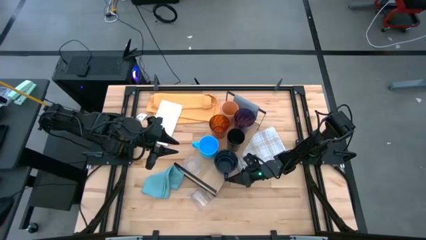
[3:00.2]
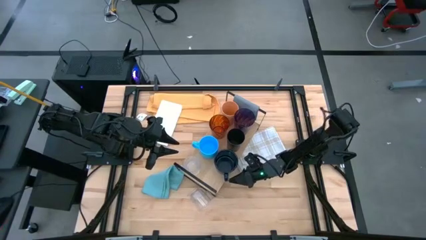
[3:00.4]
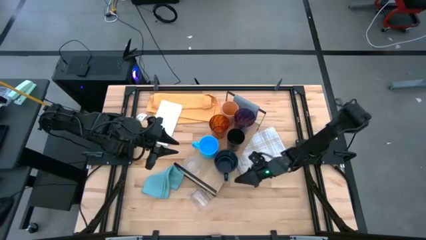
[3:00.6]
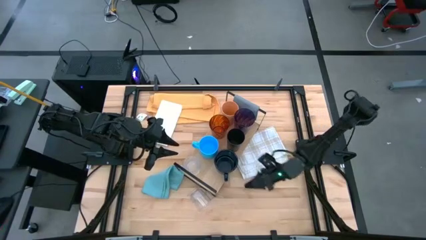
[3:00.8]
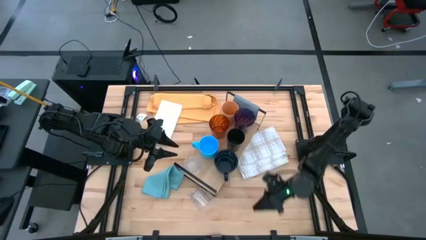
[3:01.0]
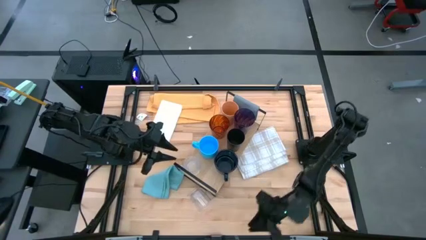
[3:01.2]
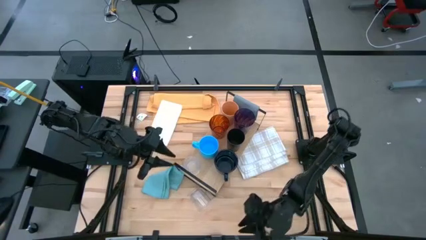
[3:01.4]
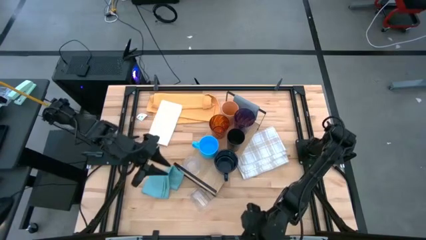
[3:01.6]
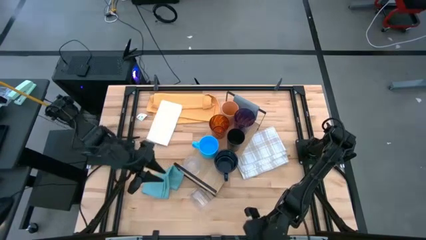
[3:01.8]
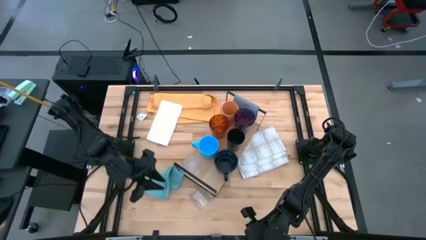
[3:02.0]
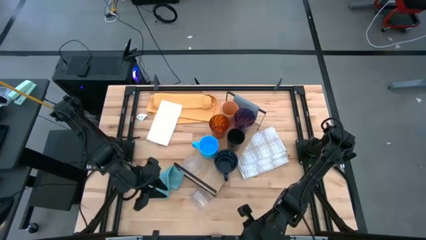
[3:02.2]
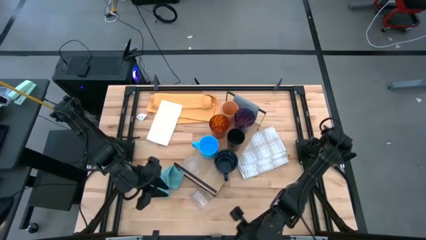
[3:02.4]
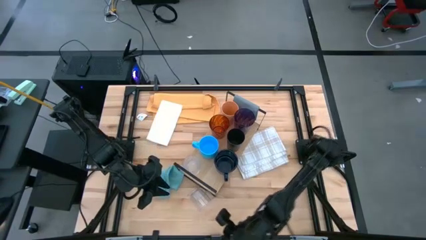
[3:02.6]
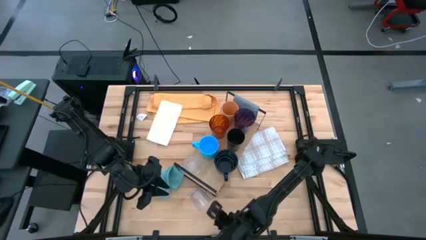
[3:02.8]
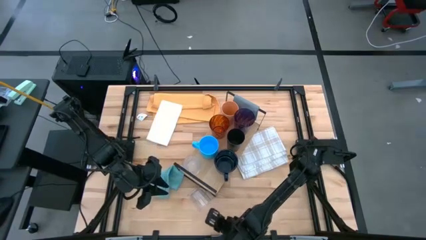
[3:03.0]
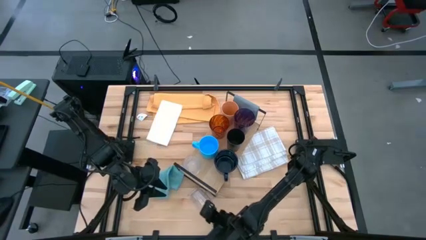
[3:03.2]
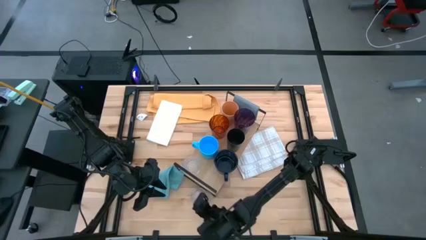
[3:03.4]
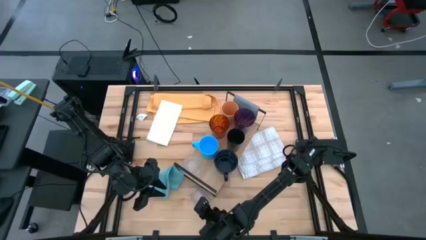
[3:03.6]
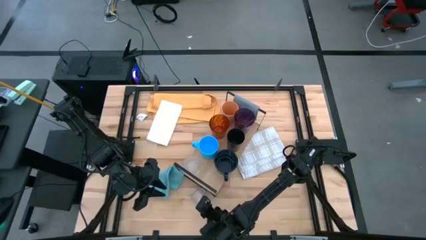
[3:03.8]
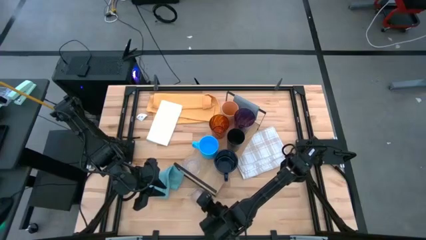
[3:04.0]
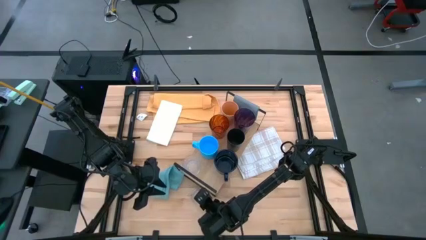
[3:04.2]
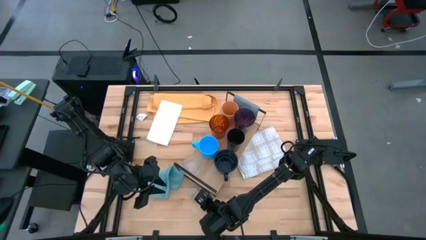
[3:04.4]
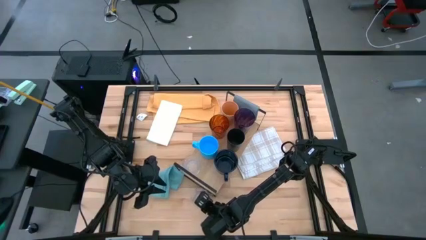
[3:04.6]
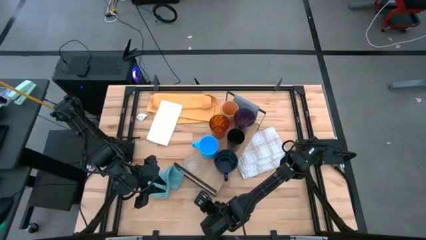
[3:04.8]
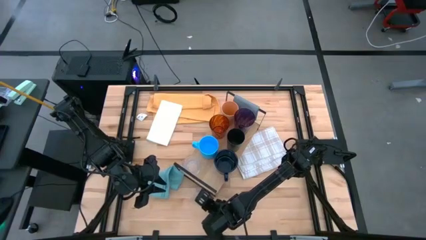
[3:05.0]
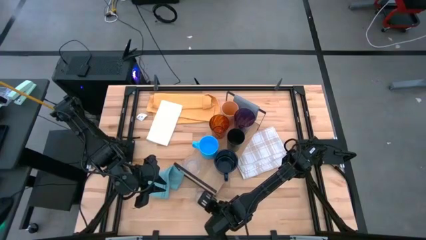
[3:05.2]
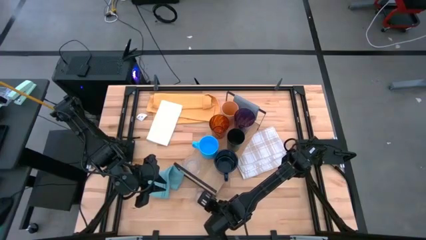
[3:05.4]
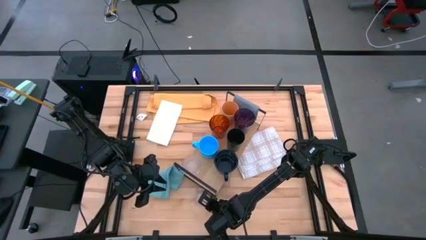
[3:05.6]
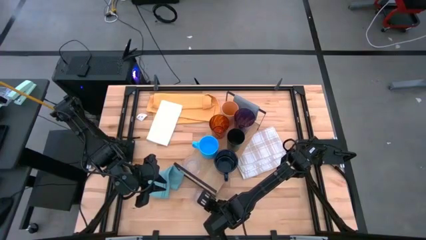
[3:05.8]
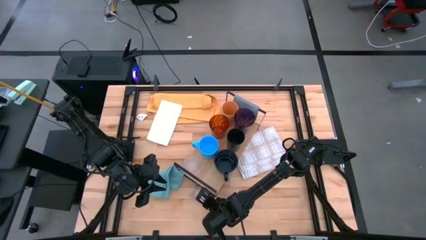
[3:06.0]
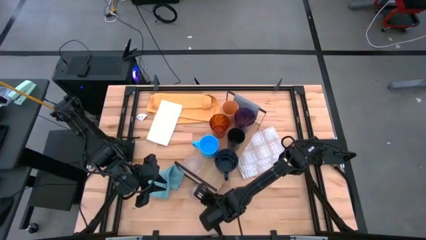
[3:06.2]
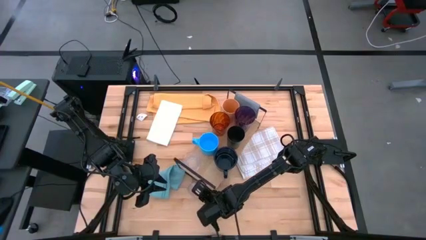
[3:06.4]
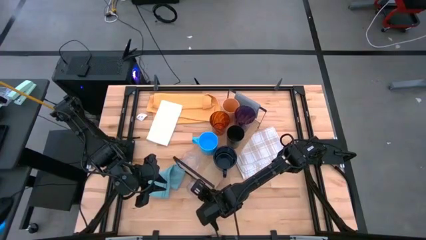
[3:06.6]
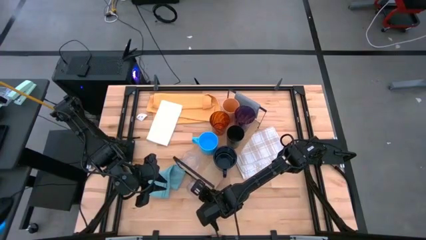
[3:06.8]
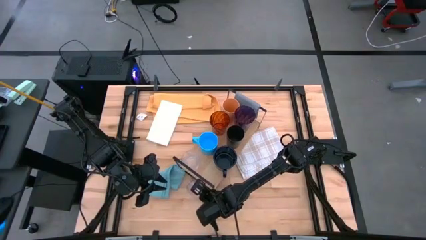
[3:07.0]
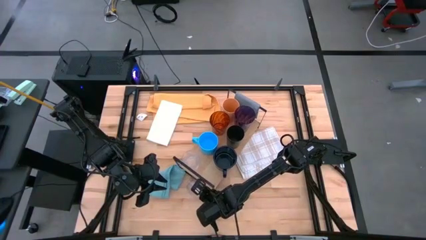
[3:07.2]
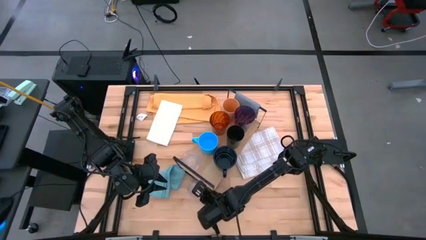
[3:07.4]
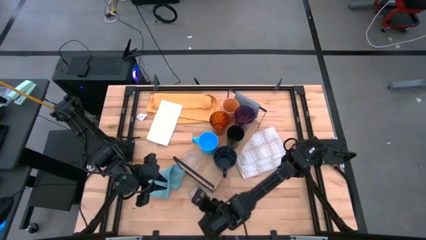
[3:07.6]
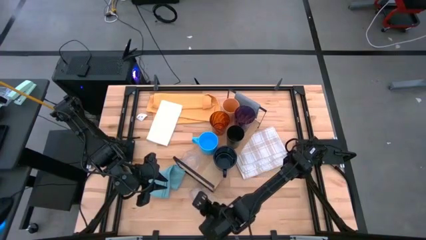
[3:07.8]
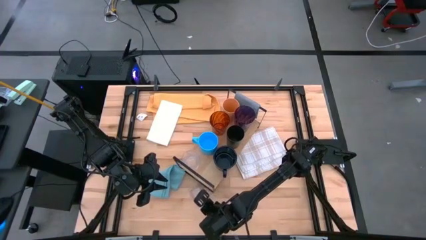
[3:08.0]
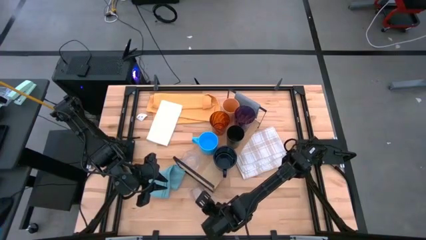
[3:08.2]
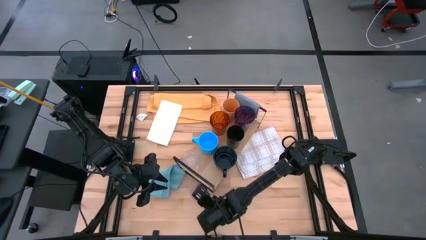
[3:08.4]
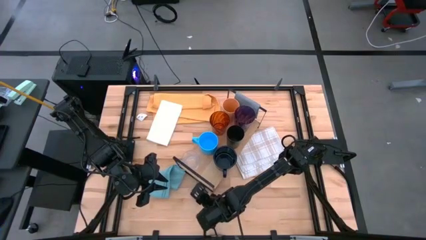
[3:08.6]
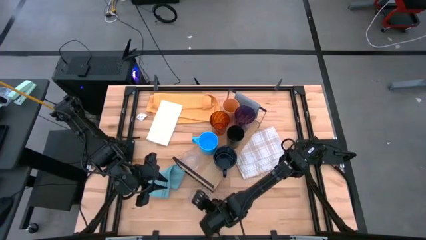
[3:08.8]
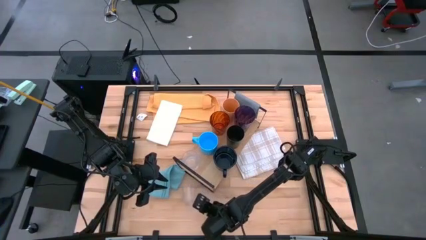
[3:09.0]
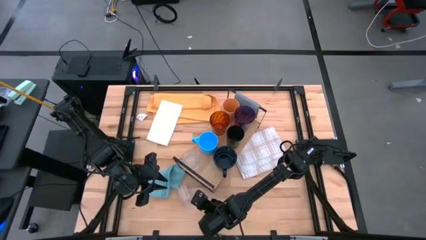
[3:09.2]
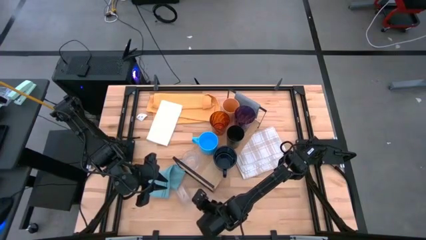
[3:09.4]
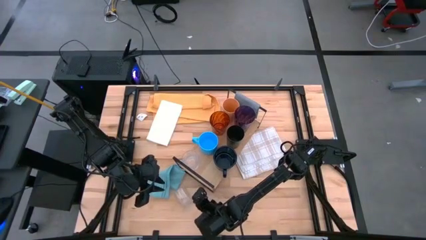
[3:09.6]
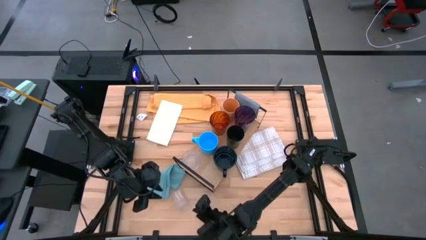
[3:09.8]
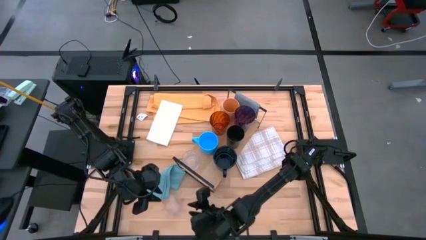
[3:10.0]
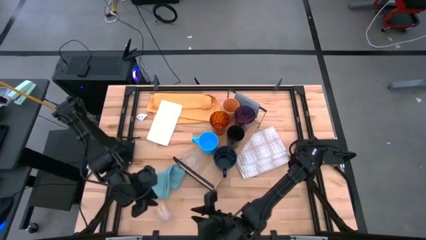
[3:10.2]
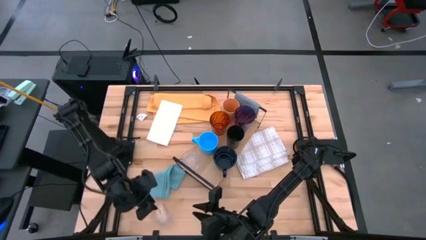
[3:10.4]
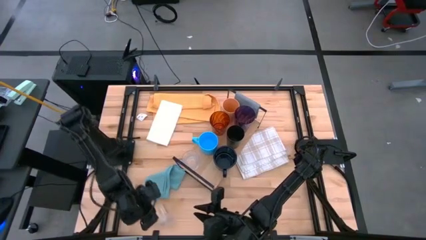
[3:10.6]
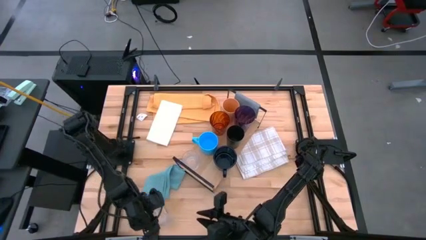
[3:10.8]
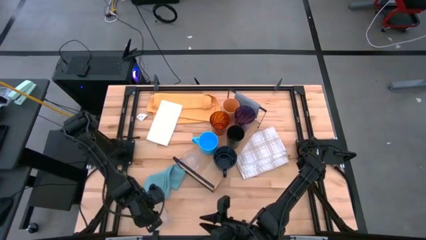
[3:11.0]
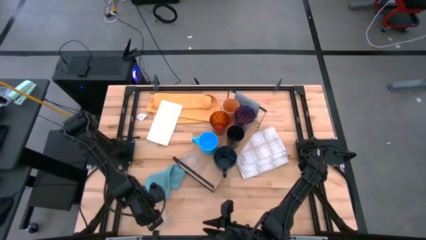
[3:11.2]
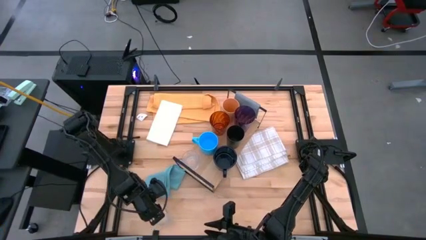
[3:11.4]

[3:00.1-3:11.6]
Task: Stack small to large cups/mugs on shelf
Put the transparent mug on the shelf

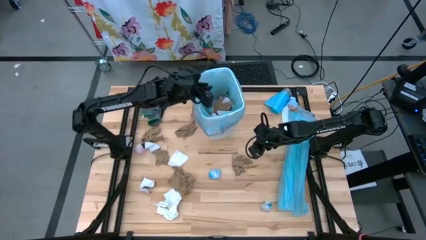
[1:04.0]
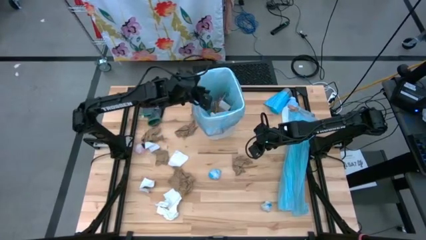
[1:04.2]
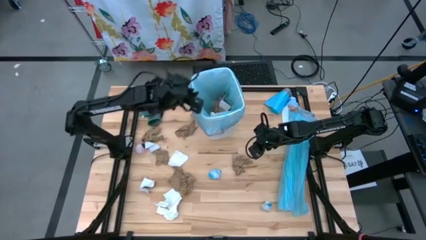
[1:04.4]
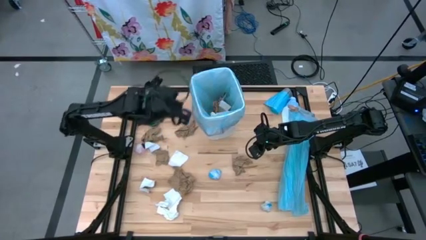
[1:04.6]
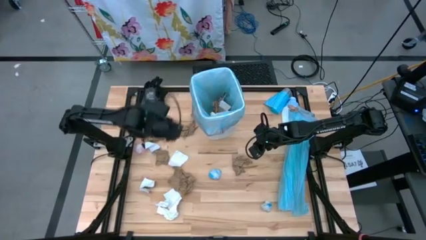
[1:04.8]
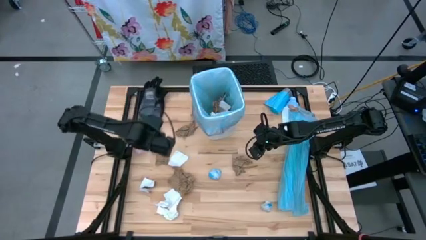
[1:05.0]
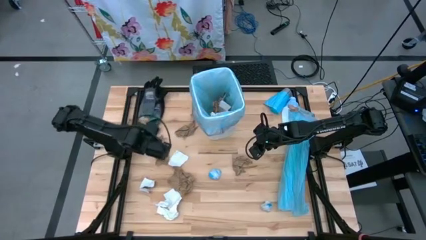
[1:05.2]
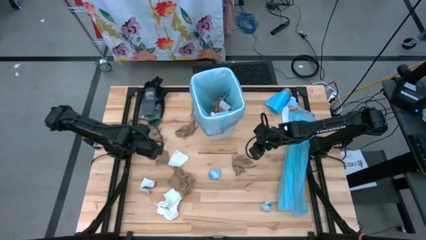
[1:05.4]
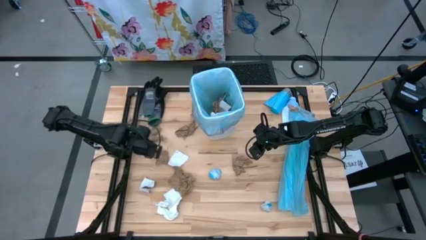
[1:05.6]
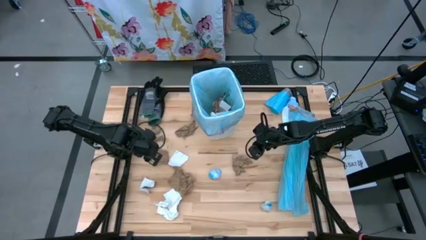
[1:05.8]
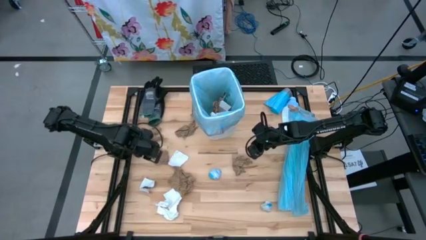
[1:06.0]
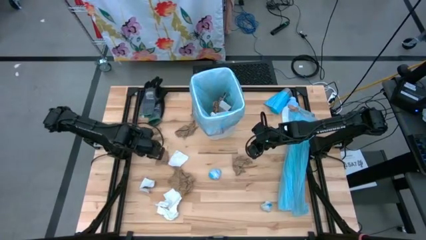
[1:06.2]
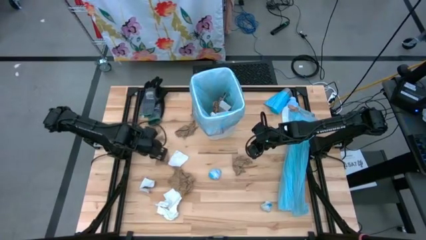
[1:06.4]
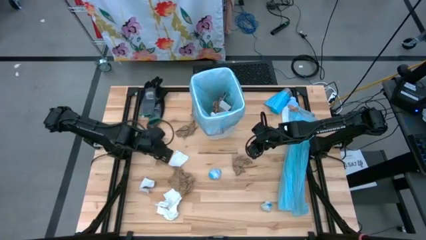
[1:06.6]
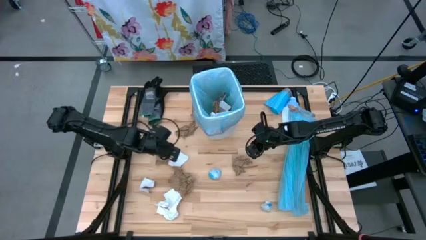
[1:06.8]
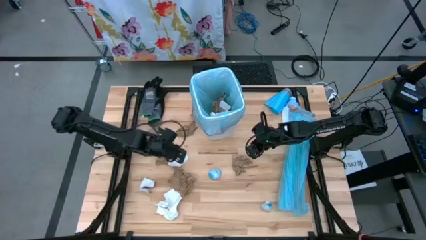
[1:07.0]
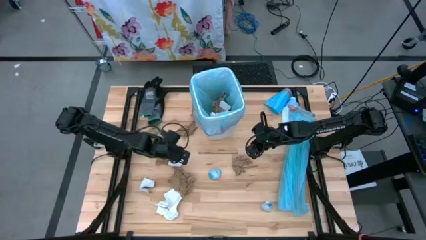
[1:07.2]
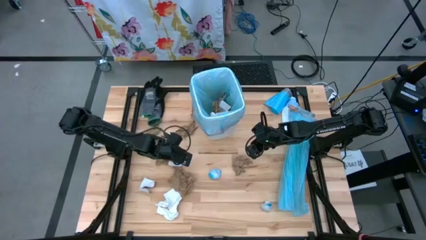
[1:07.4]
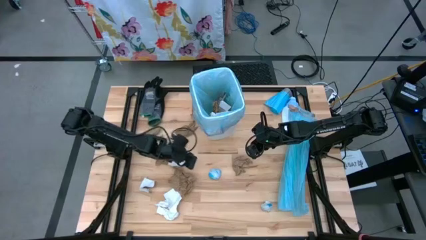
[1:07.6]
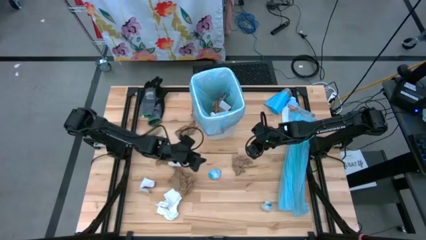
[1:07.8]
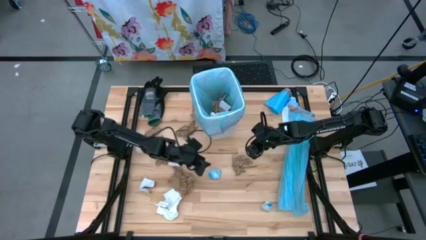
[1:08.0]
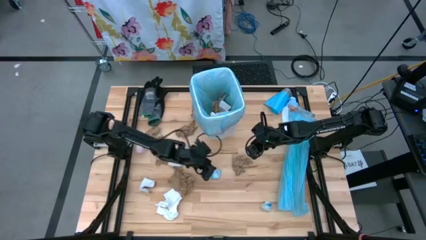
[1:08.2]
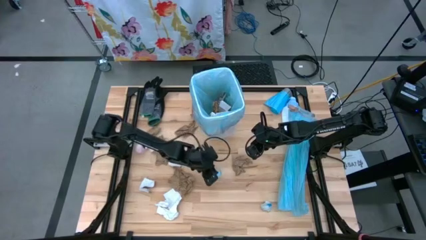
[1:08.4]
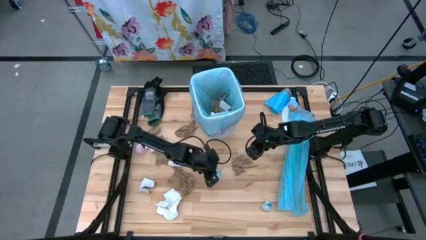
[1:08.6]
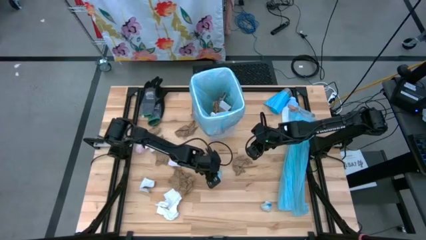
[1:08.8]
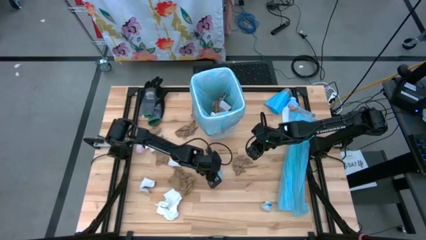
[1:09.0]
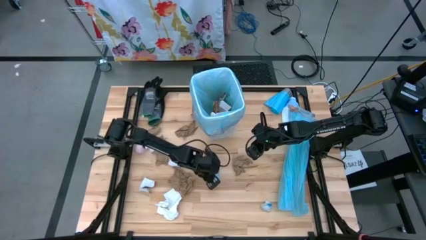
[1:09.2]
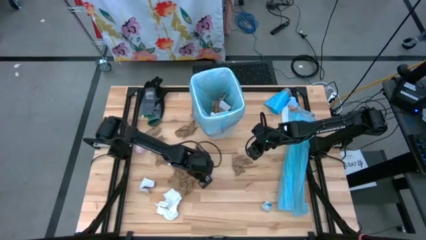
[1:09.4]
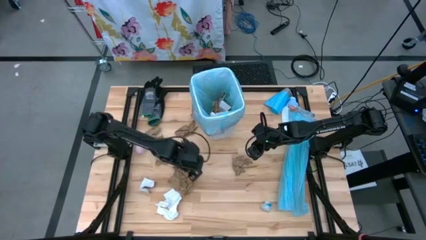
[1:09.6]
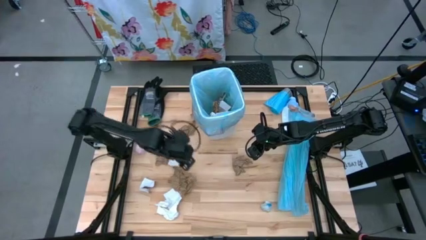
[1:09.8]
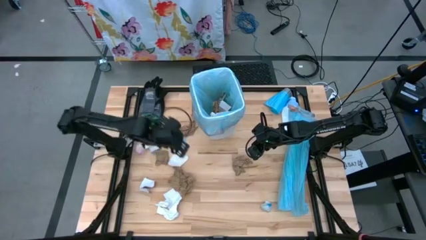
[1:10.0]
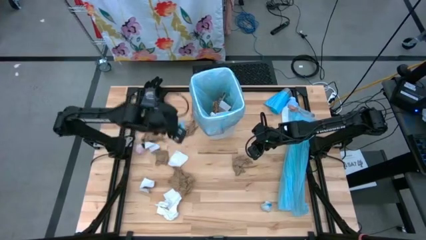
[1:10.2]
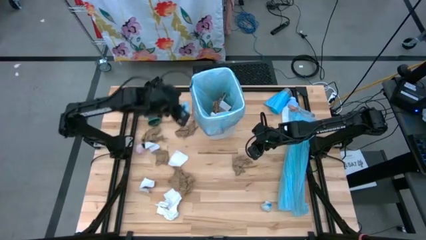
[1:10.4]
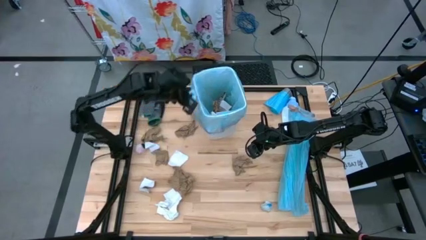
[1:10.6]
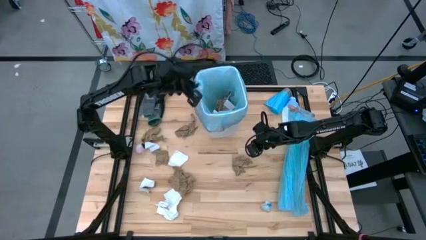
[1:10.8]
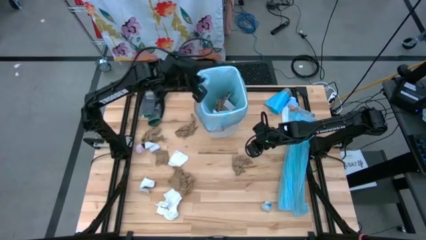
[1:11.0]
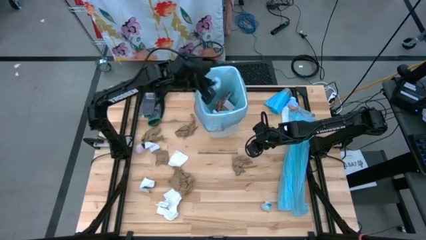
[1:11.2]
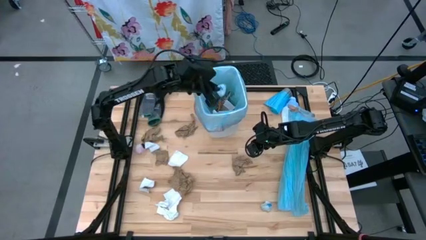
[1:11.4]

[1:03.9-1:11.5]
Task: place trash/remove bag and relplace
Put the blue plastic into the trash bin
